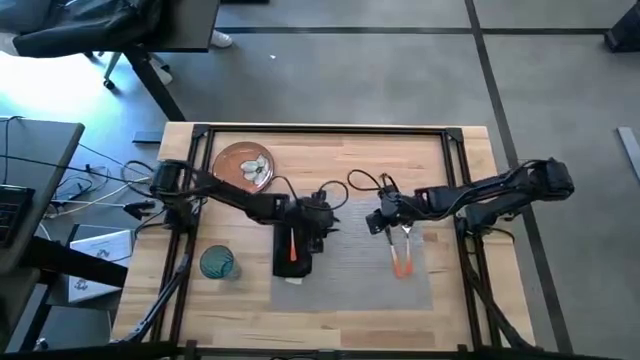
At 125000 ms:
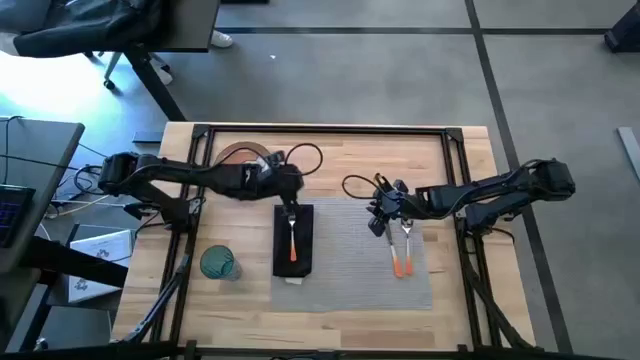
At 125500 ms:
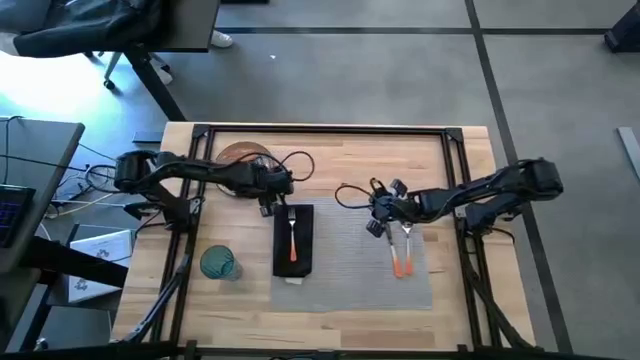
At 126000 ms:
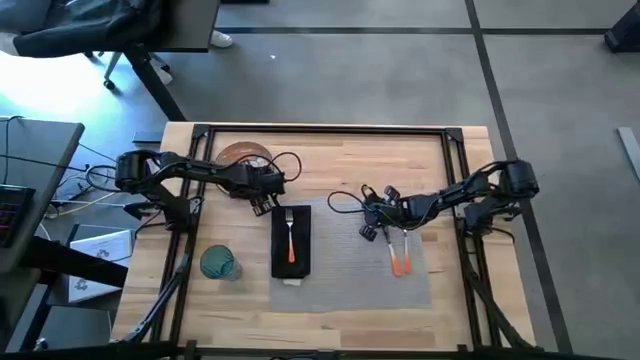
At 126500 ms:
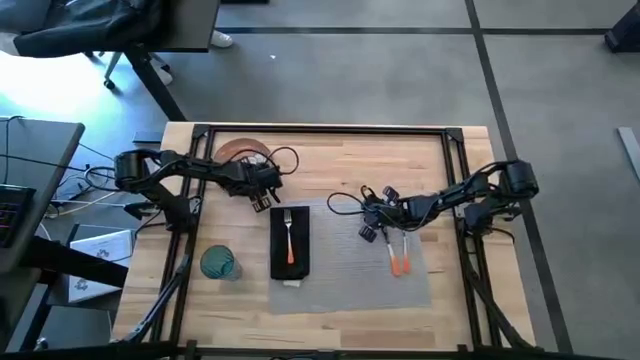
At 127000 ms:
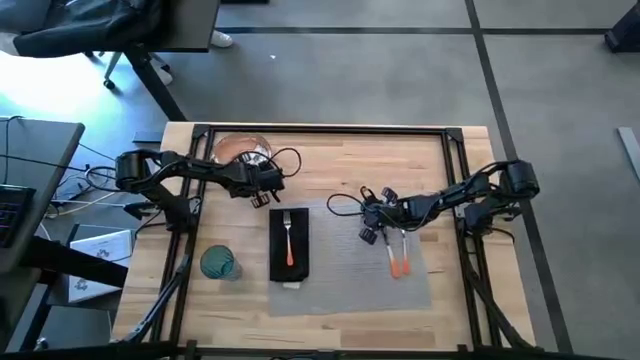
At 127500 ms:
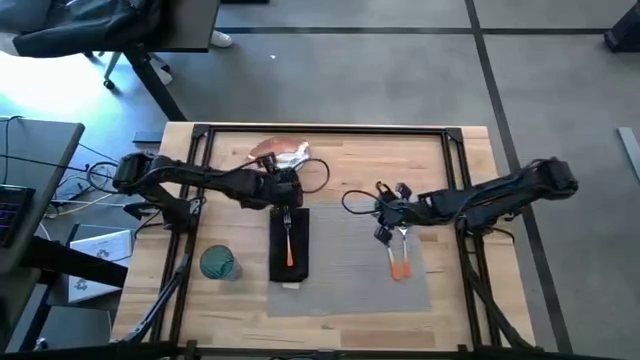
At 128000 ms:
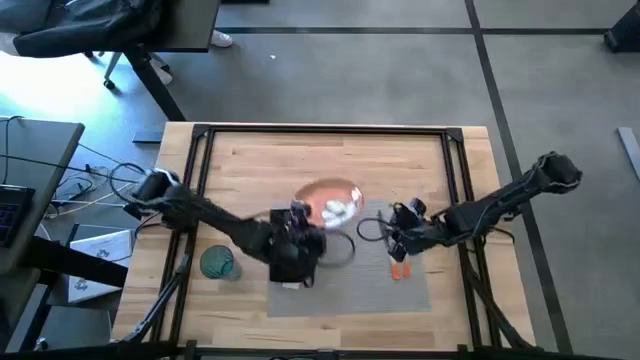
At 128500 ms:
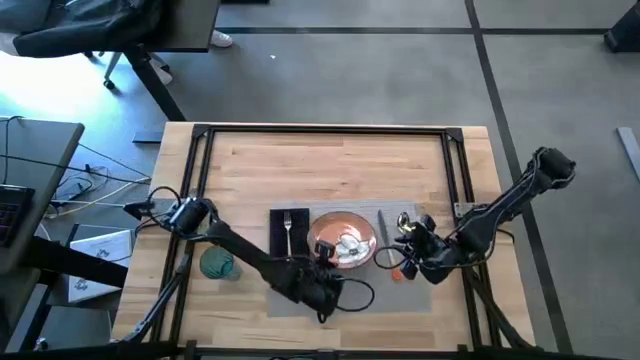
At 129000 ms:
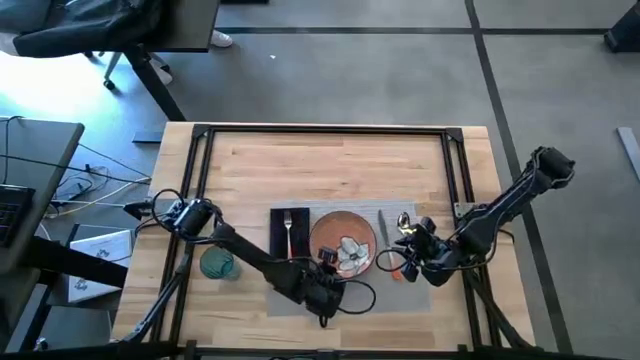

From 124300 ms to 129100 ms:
Task: Set table place
Put the brown plate on the gray mat to the right of the black napkin

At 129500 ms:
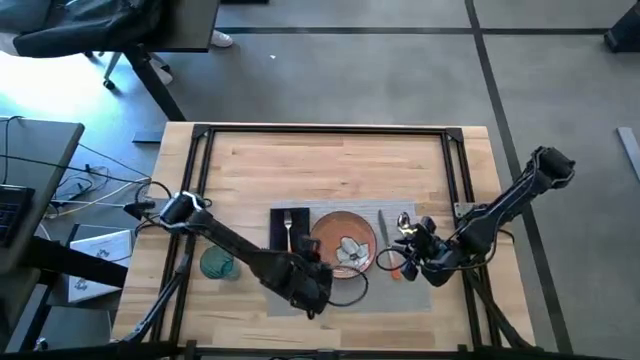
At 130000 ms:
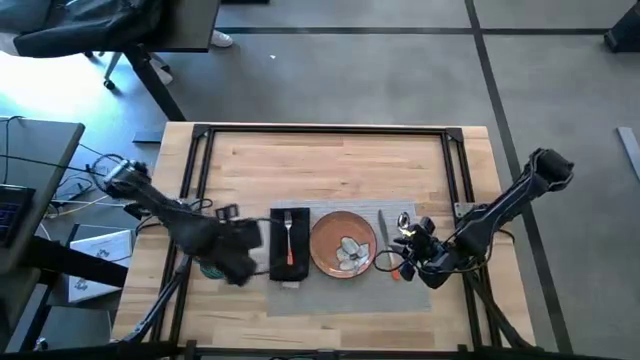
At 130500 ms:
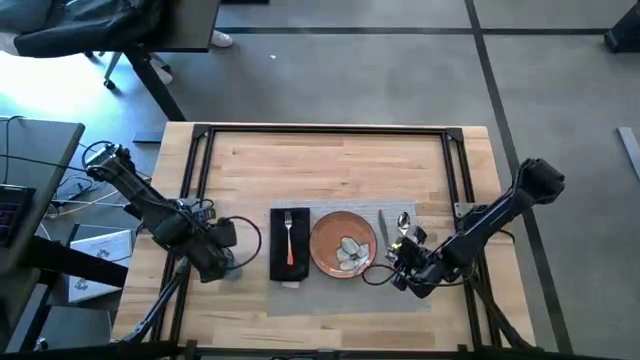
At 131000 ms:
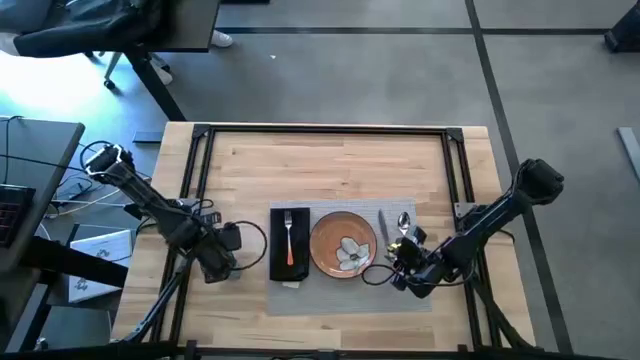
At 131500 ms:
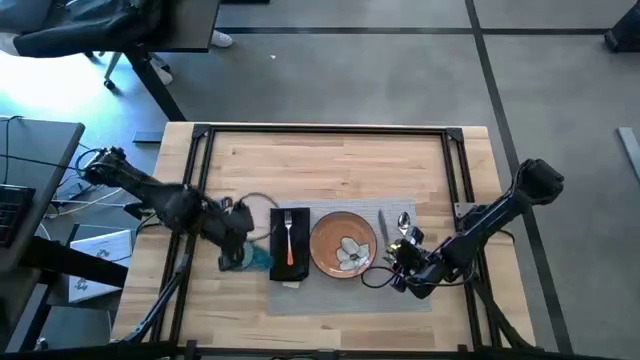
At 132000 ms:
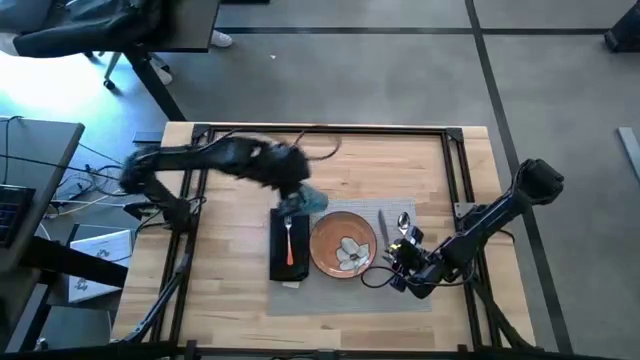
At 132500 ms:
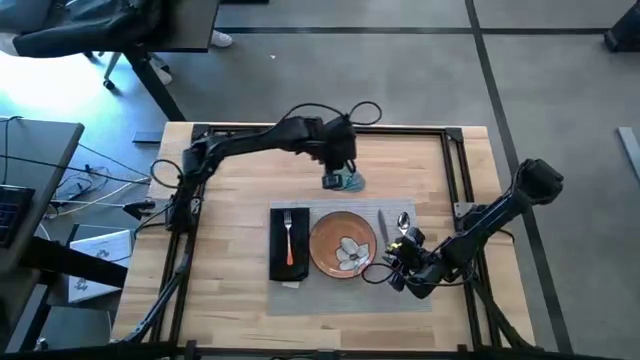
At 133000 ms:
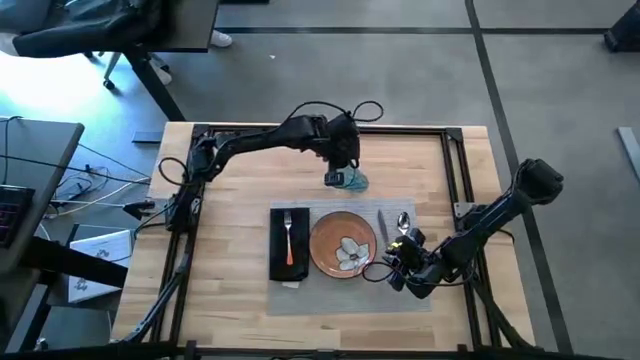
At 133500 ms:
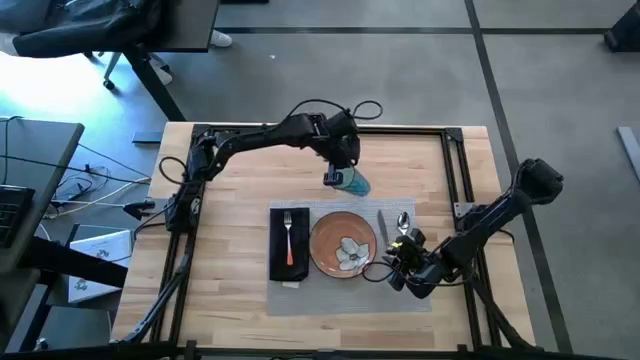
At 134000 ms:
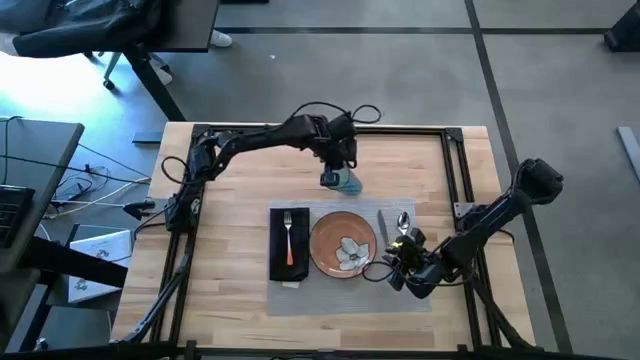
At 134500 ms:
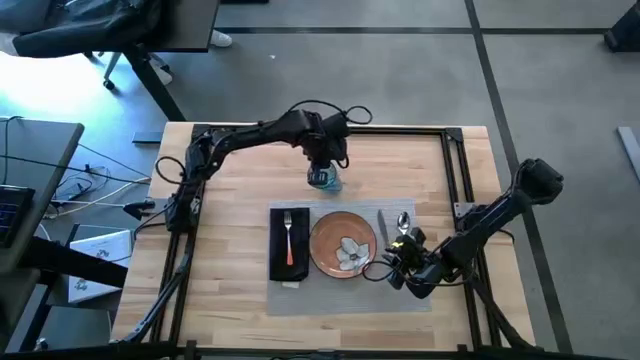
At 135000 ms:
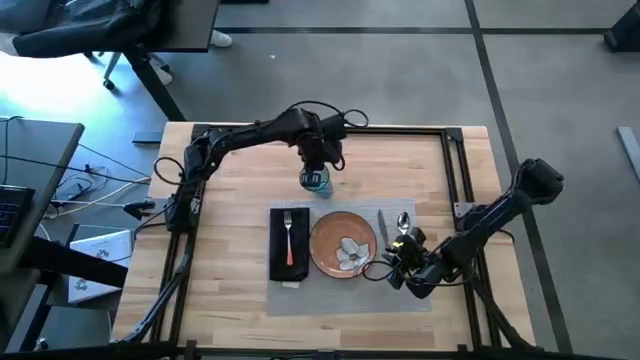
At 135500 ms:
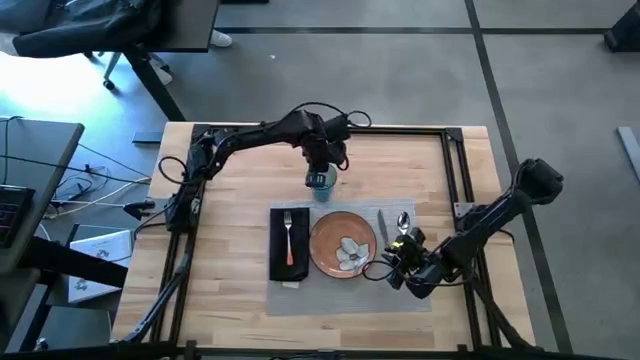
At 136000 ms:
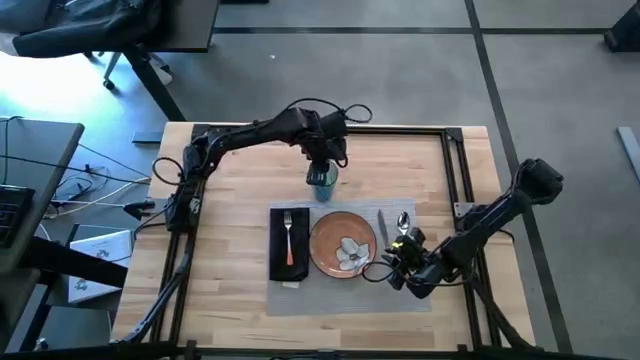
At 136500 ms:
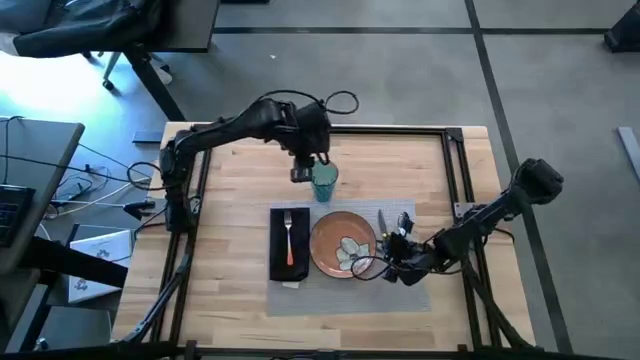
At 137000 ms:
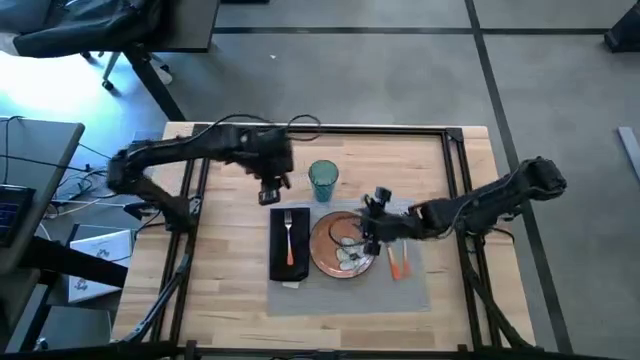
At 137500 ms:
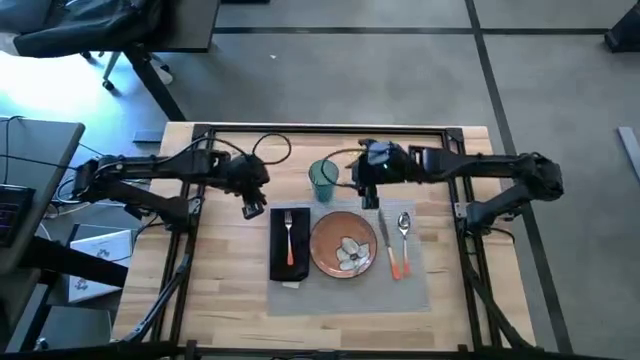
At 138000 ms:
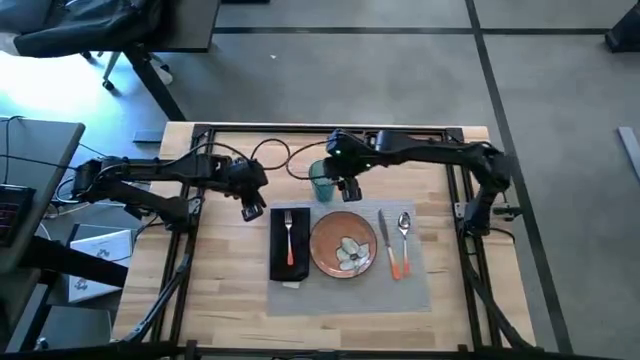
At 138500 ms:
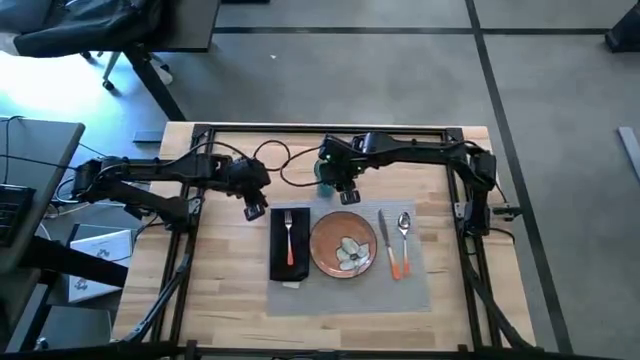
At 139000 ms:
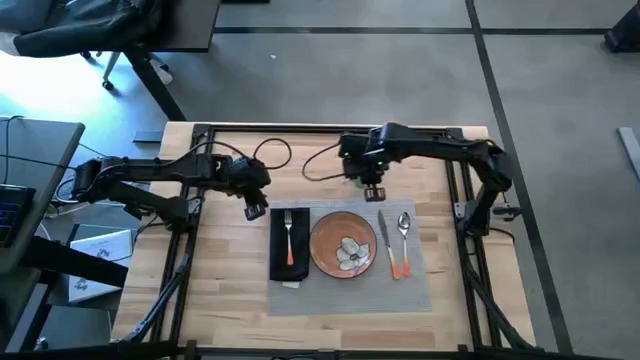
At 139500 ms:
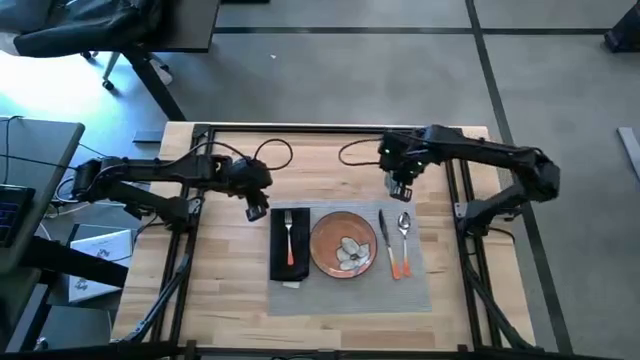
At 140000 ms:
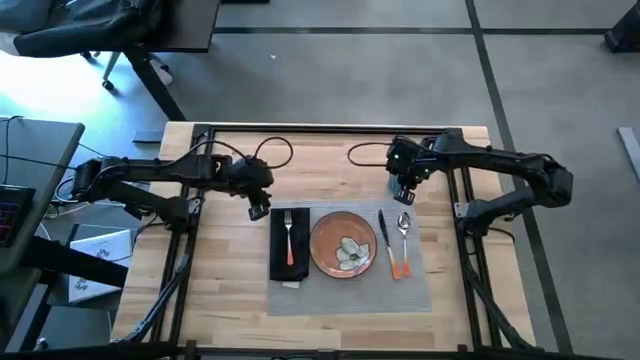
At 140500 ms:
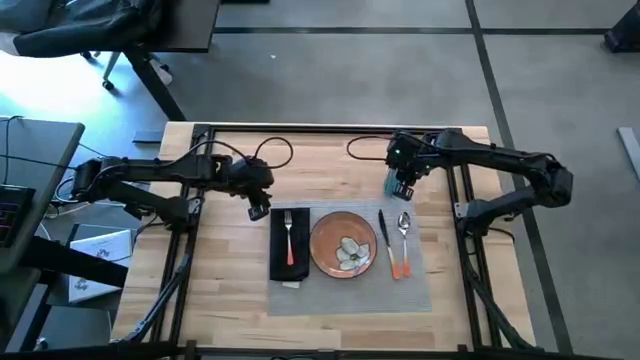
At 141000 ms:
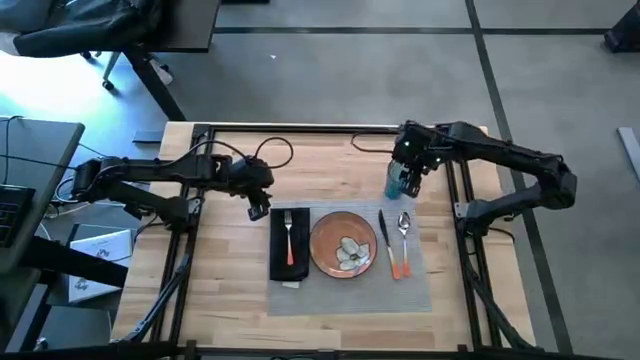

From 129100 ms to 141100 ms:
Put the blue cup on the top left of the spoon

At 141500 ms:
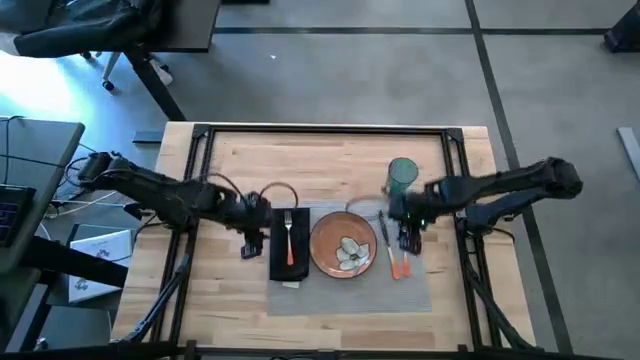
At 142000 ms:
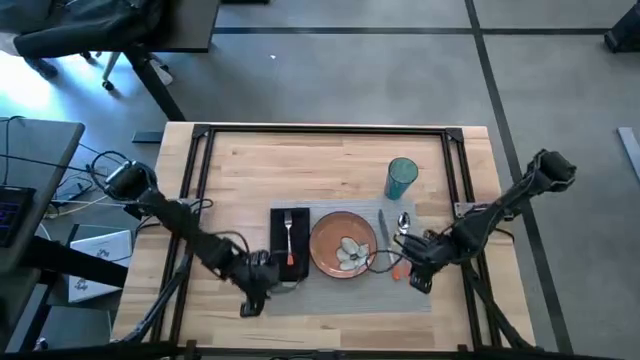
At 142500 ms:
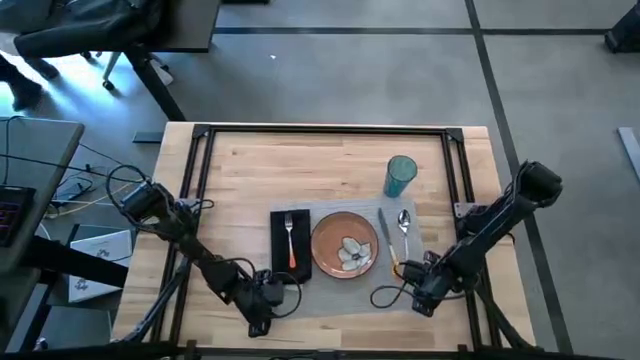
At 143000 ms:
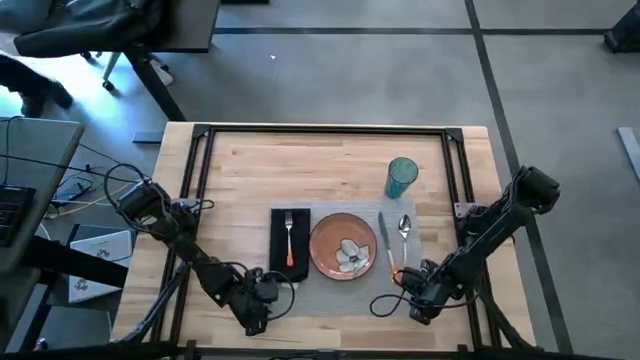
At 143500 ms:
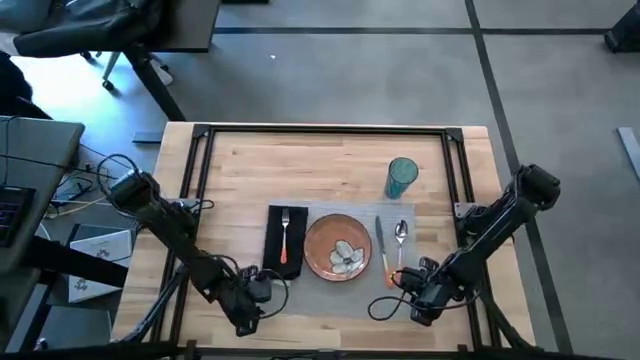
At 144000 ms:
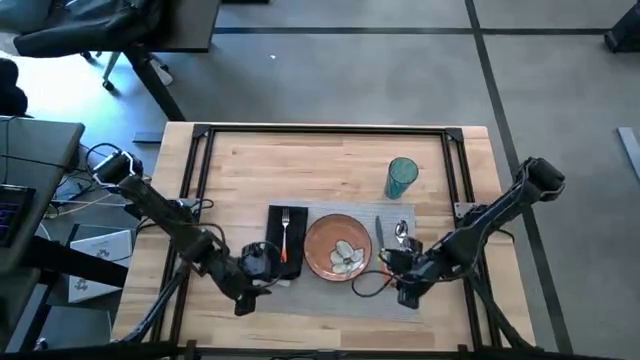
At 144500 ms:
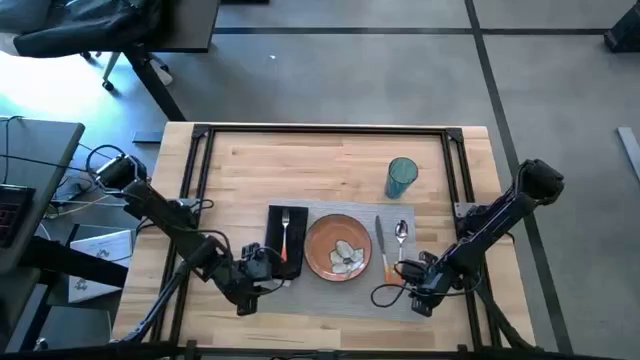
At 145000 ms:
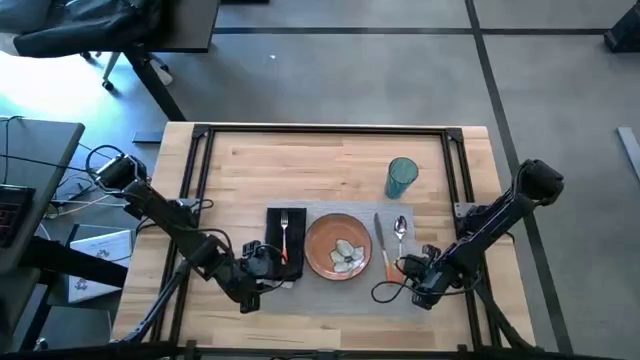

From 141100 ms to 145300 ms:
Adjust the gray mat
